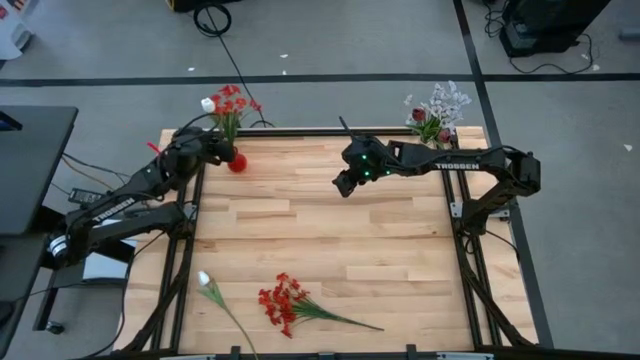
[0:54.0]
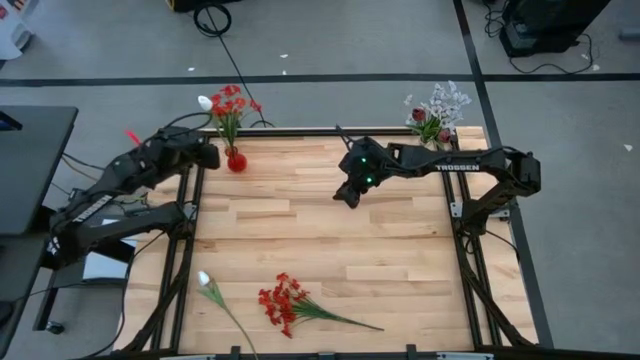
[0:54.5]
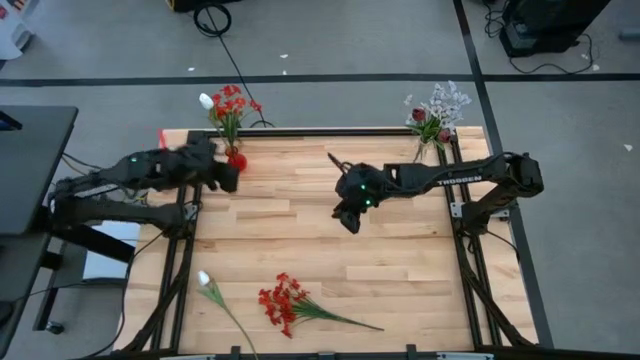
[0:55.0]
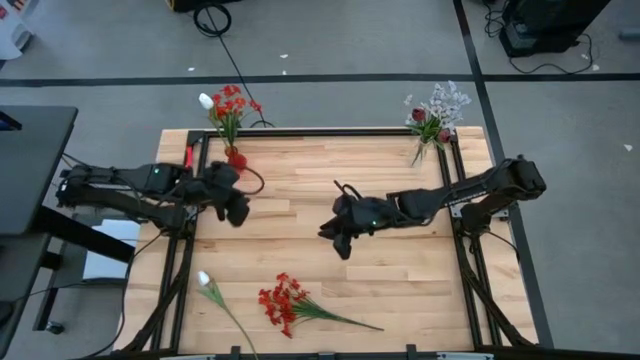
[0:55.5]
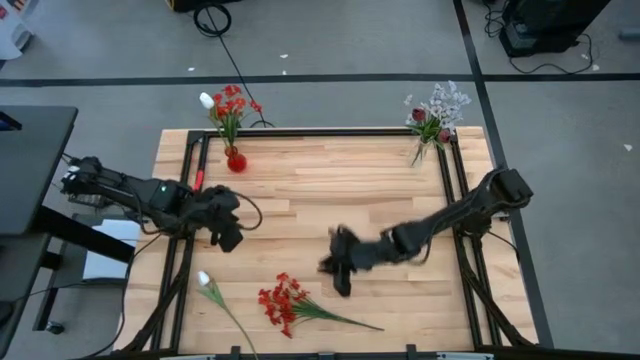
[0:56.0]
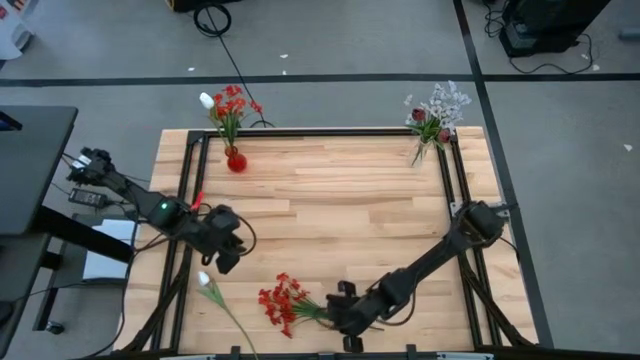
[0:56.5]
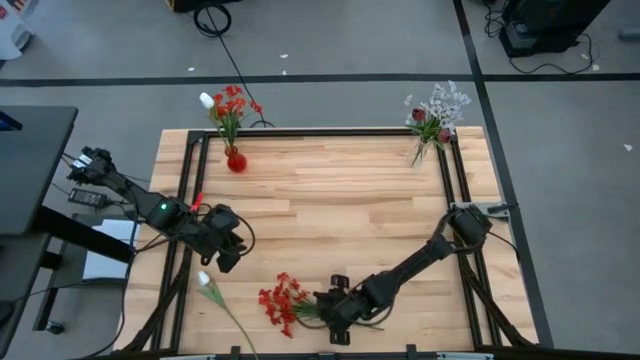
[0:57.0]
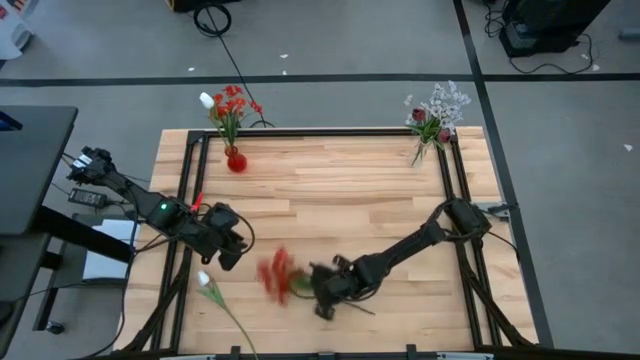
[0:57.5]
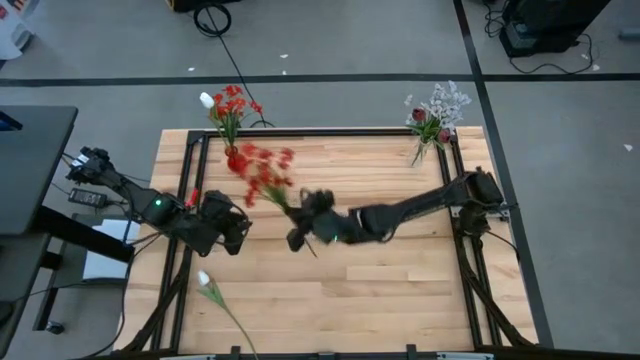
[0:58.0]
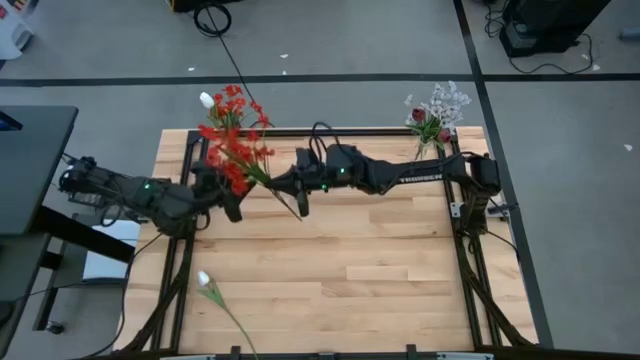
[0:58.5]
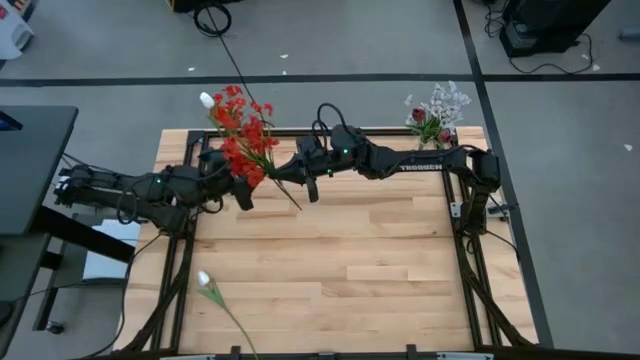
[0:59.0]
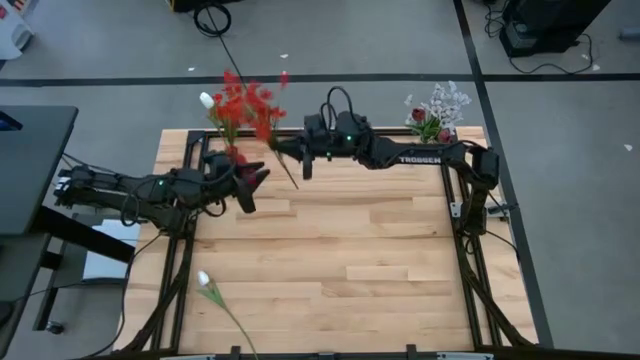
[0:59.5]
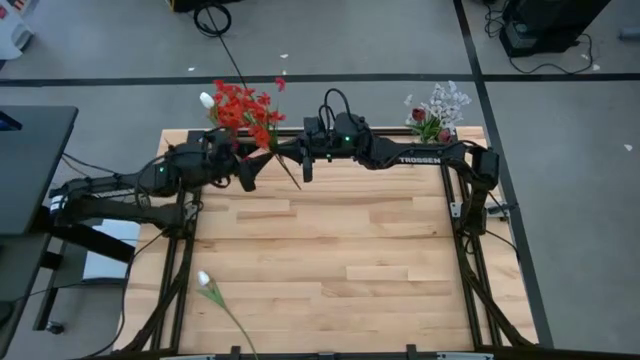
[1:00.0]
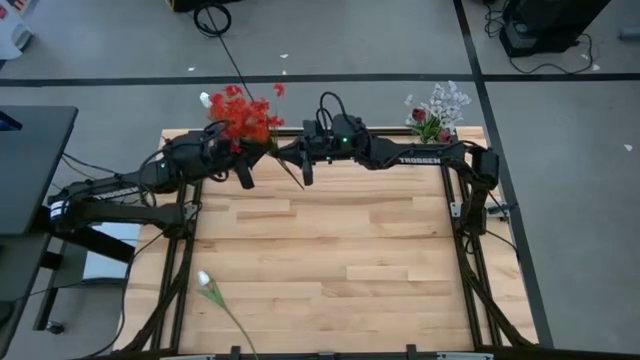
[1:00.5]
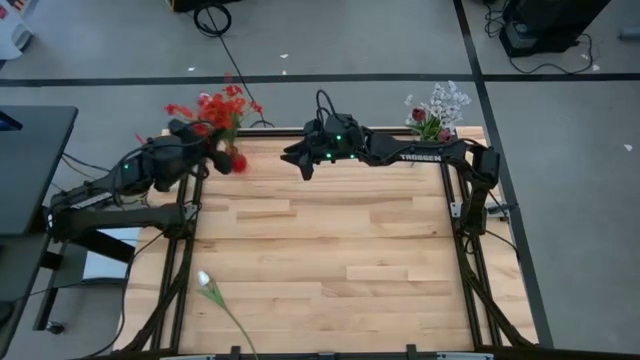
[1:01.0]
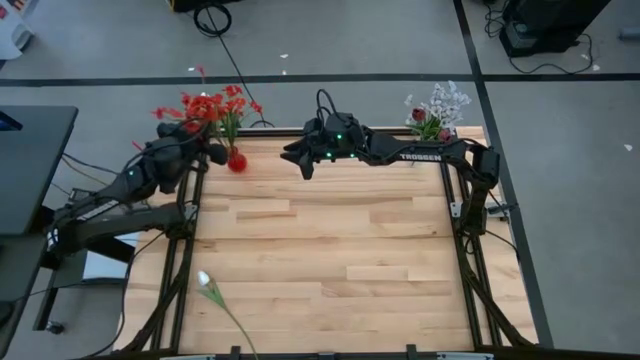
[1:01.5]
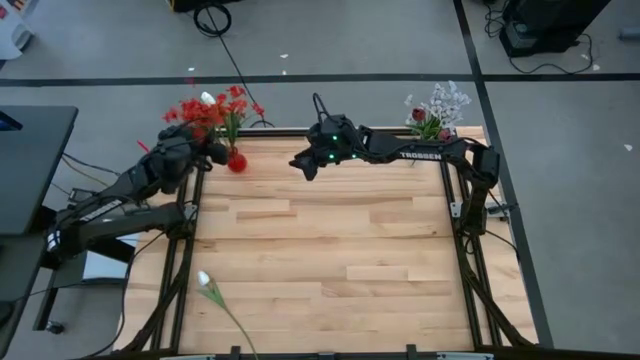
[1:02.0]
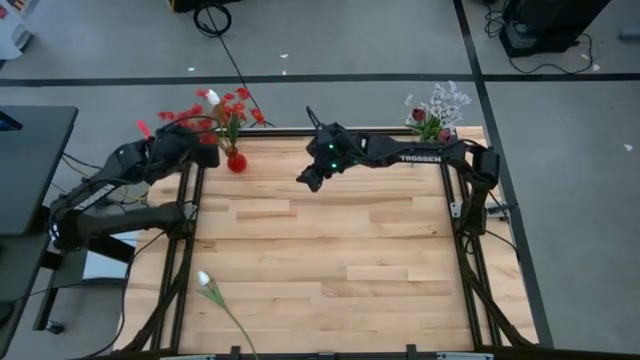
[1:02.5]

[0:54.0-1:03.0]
Task: Sort flowers into vase by color
Put the red flowers into the red vase

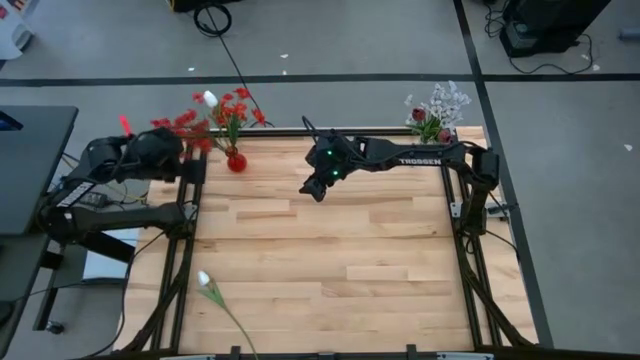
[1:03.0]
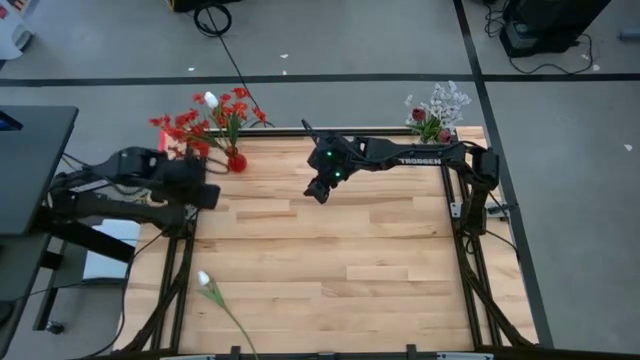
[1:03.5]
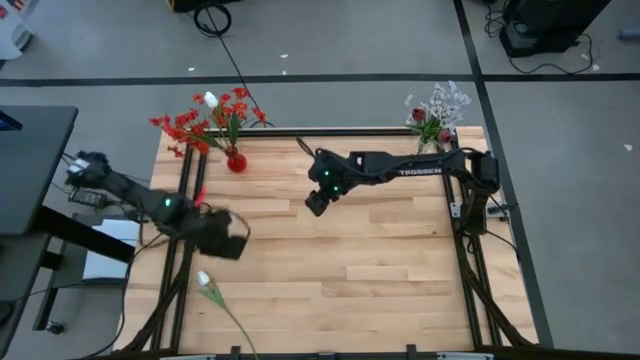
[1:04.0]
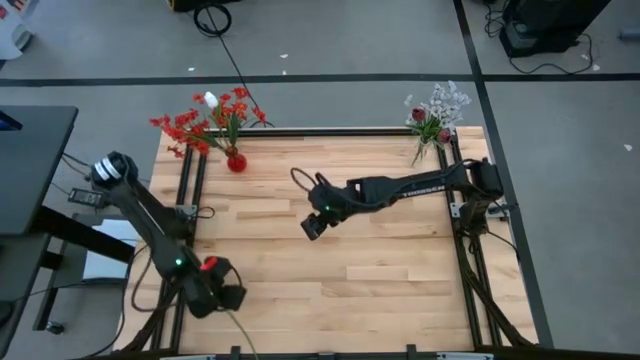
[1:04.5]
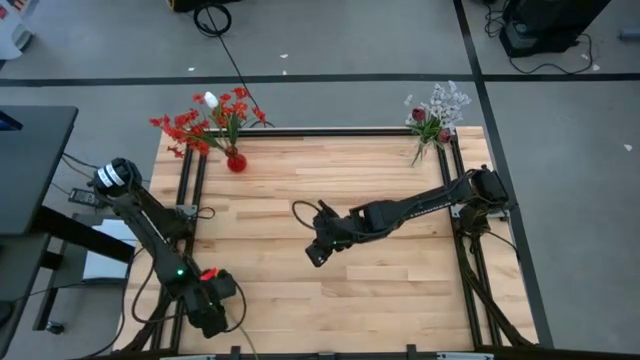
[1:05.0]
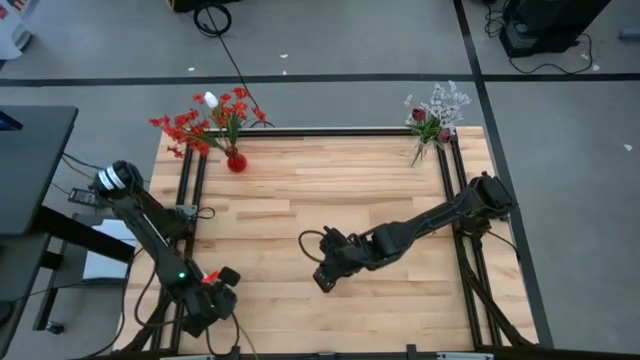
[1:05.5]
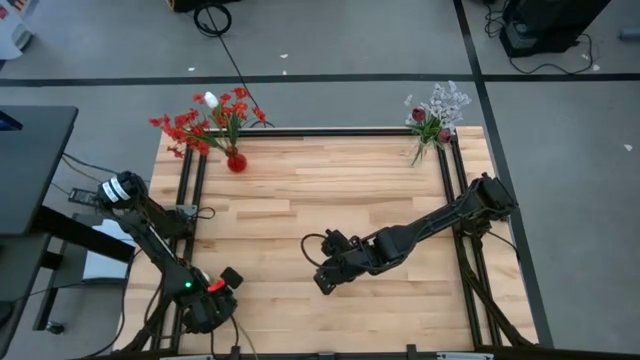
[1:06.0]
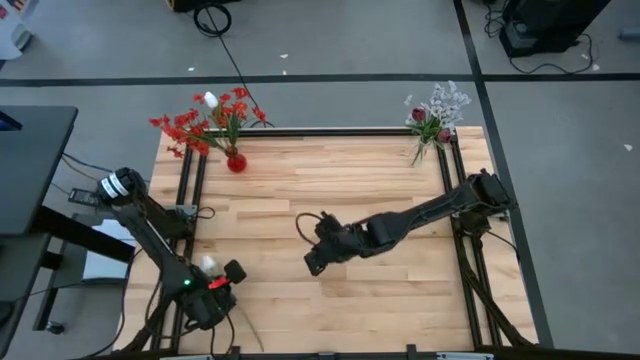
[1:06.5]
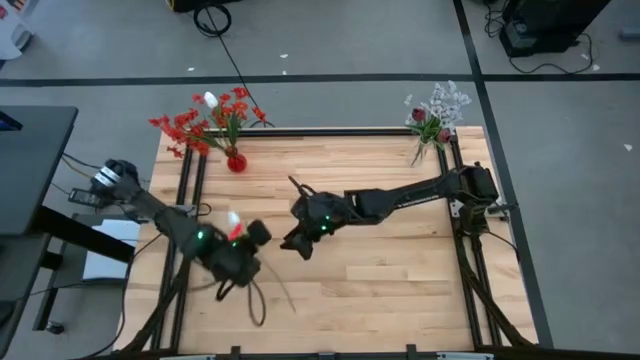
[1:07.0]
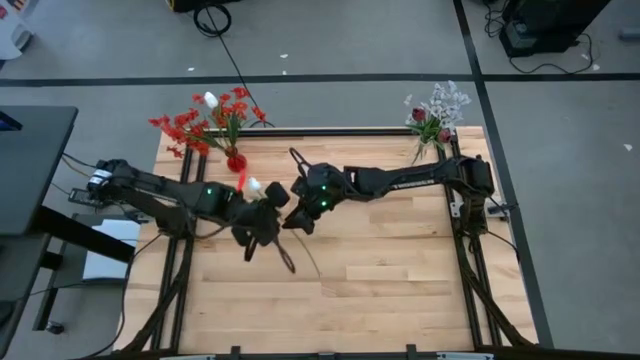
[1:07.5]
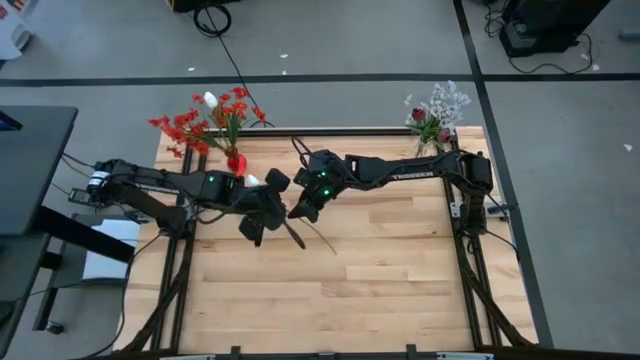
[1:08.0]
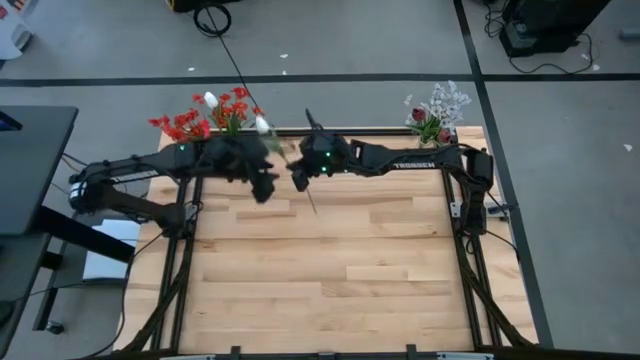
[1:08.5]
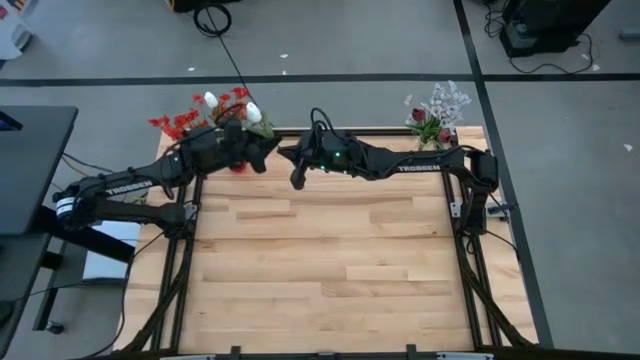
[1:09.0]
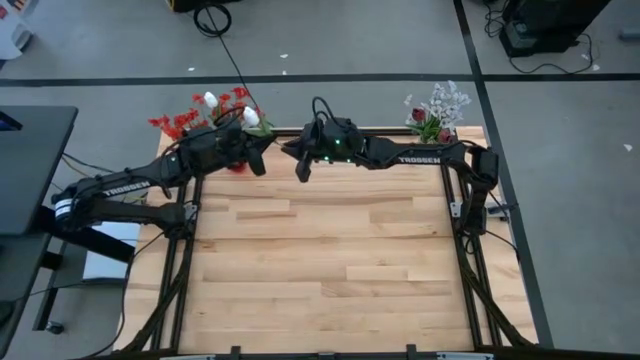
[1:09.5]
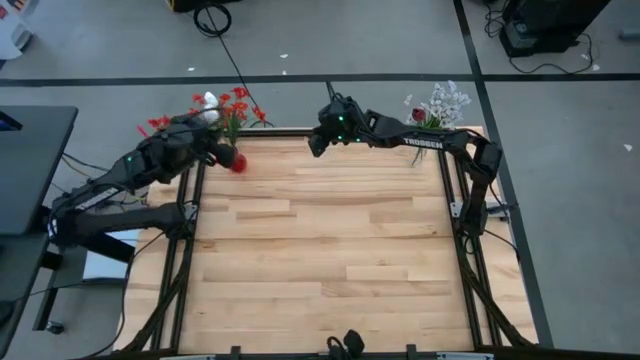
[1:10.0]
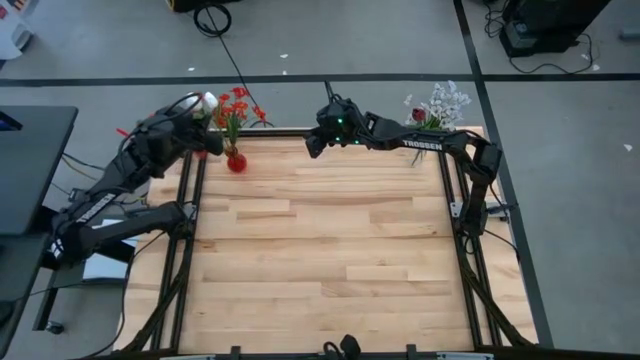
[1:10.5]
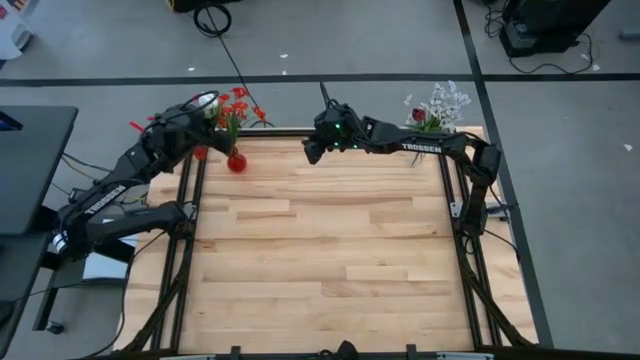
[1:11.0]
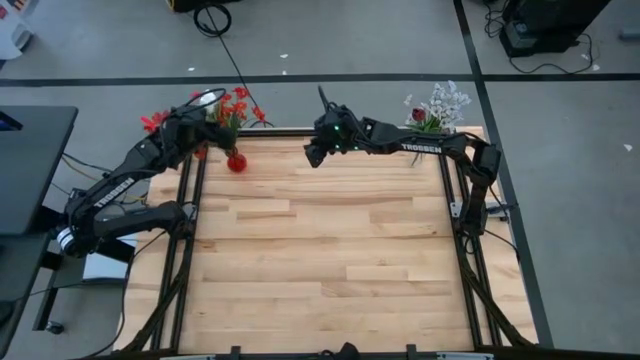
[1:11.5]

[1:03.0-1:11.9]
Put the white flower into the red vase

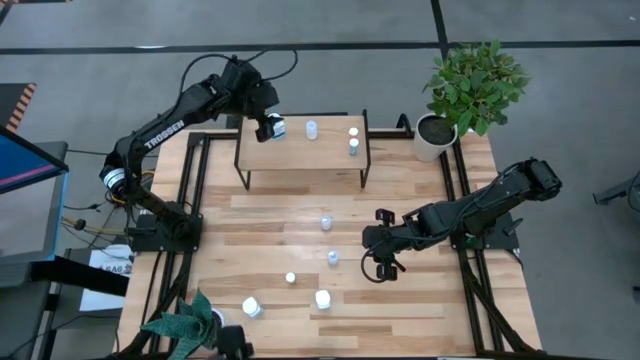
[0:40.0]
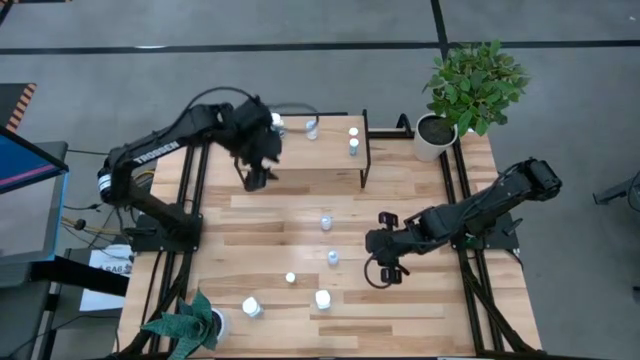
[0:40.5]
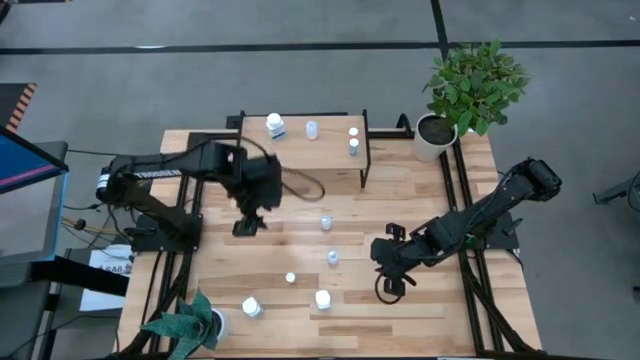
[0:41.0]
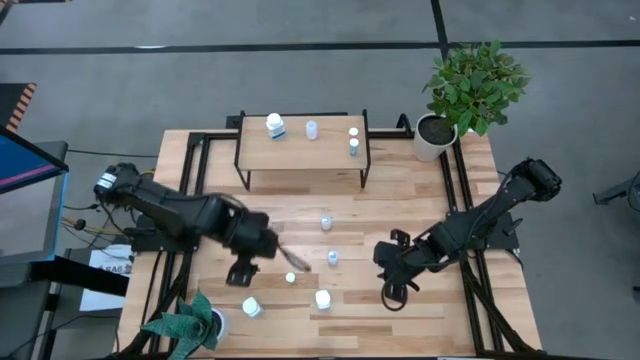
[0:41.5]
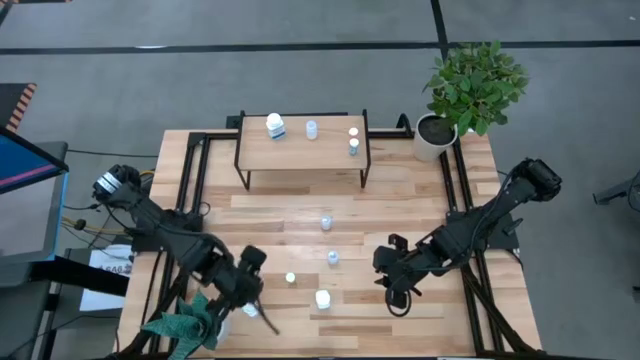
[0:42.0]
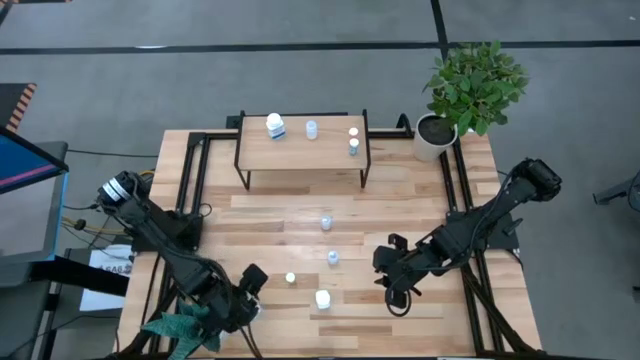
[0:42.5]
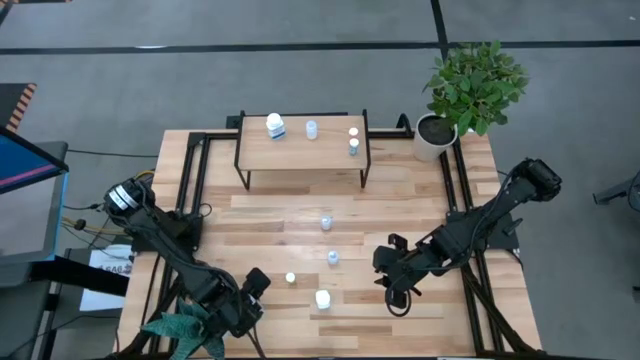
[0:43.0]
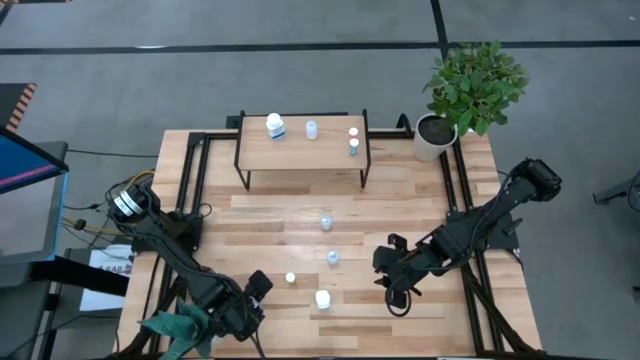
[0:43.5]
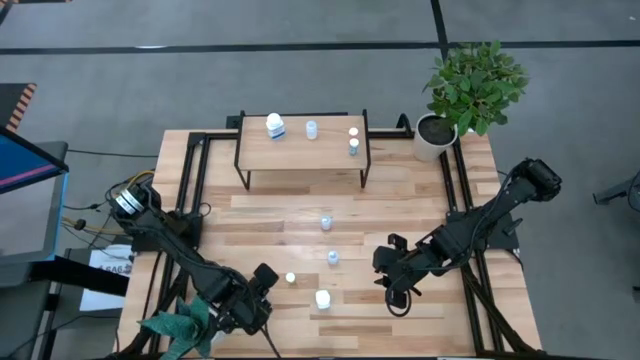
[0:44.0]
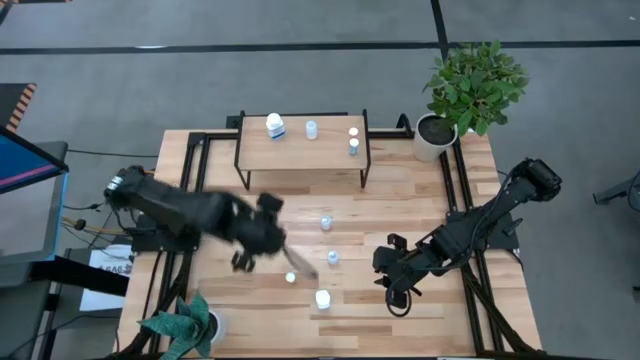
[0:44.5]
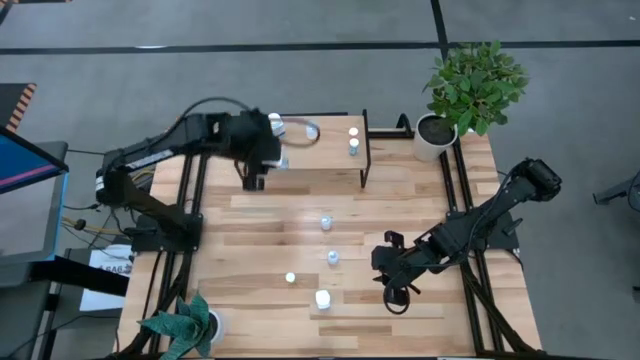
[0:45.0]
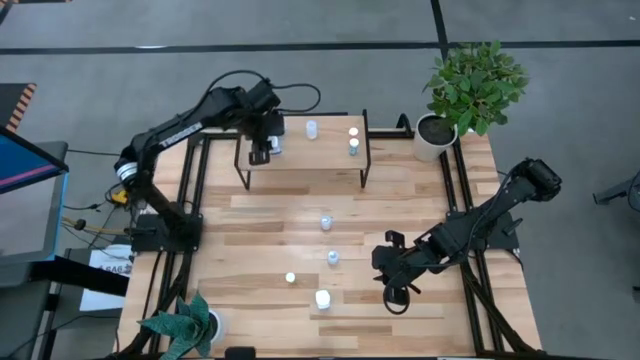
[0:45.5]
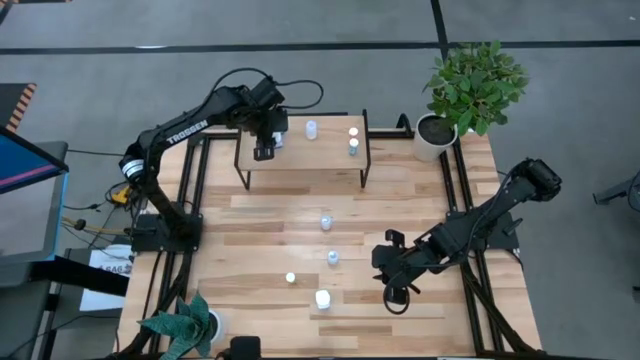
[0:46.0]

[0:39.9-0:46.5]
Task: Pick and place medicine bottles onto shelf by color
Put the left white pill bottle on the shelf aligned with the other white pill bottle
